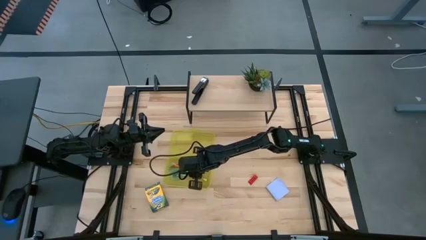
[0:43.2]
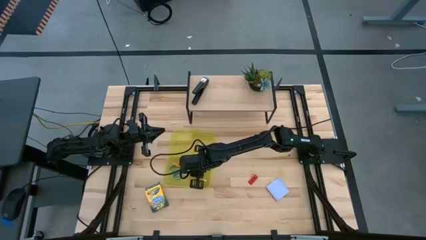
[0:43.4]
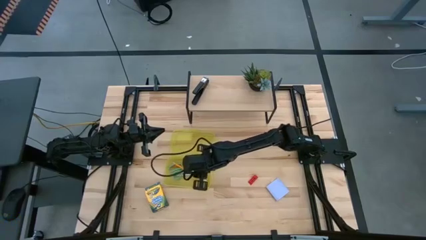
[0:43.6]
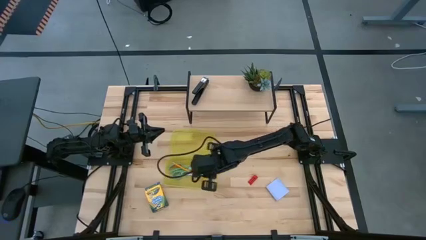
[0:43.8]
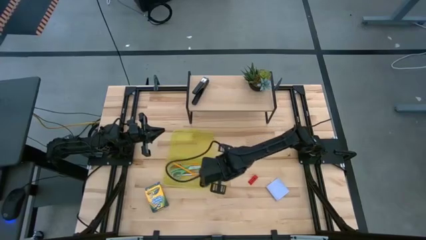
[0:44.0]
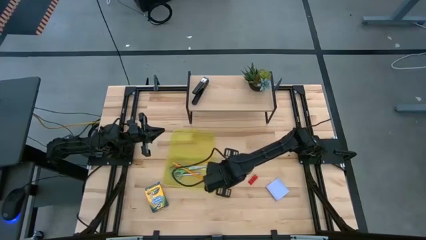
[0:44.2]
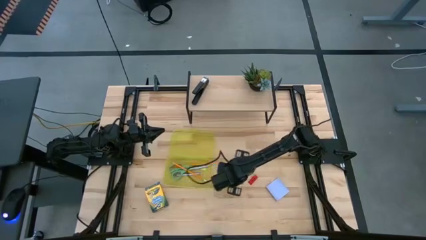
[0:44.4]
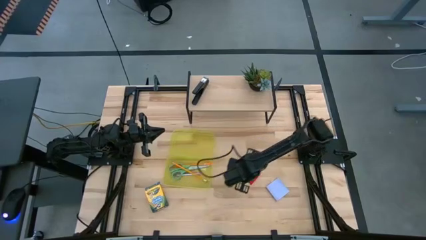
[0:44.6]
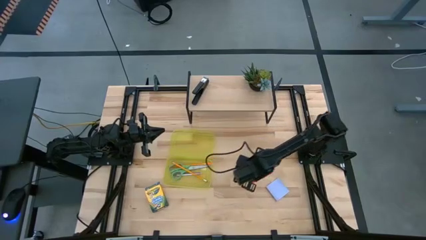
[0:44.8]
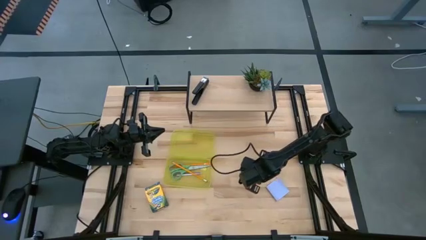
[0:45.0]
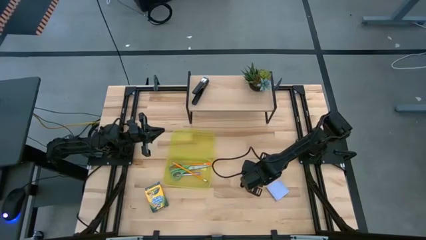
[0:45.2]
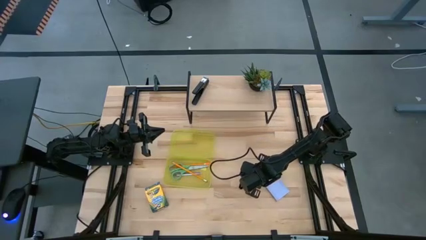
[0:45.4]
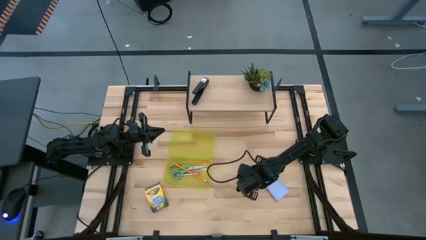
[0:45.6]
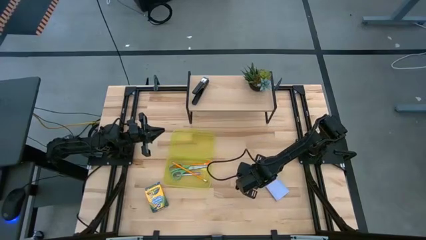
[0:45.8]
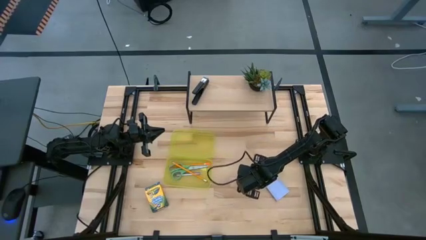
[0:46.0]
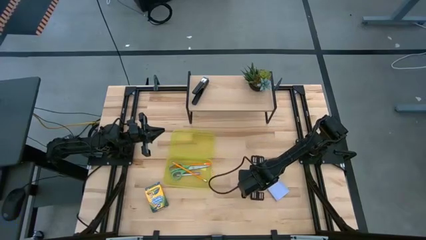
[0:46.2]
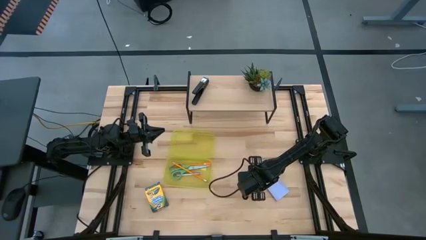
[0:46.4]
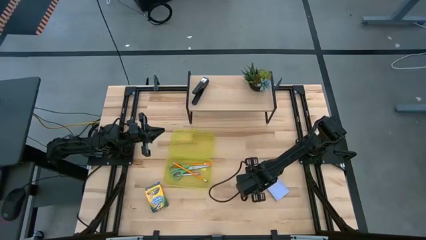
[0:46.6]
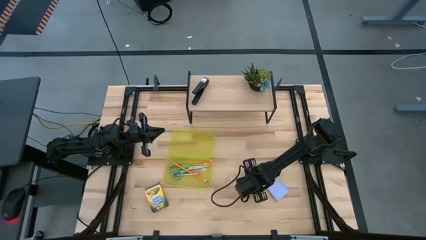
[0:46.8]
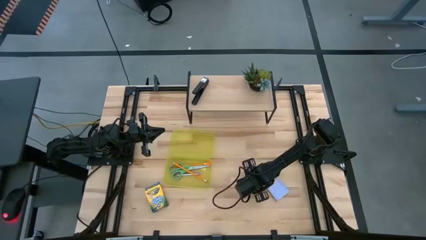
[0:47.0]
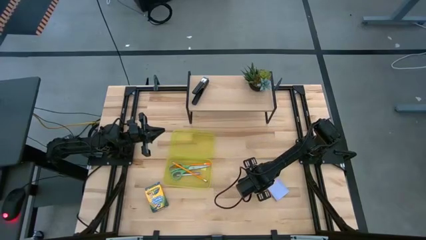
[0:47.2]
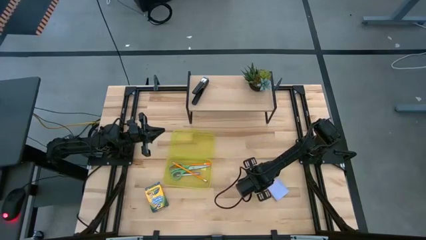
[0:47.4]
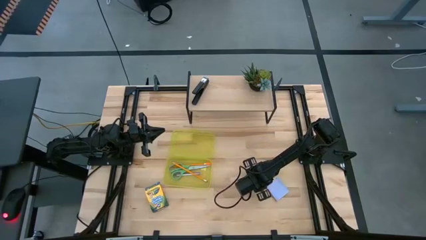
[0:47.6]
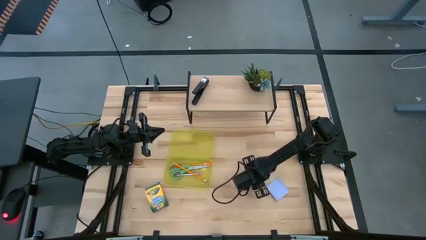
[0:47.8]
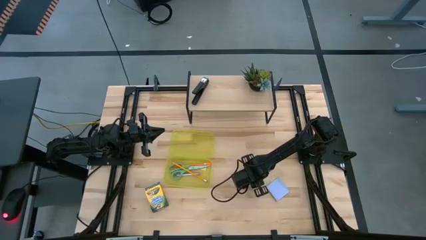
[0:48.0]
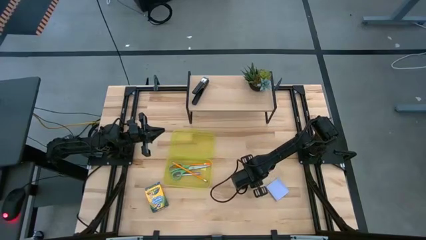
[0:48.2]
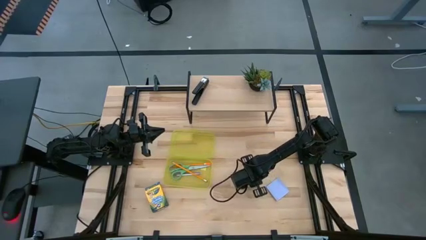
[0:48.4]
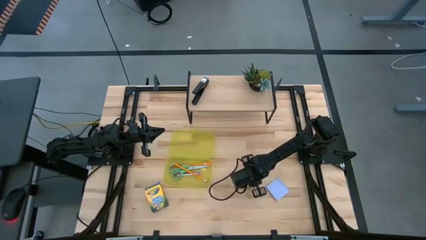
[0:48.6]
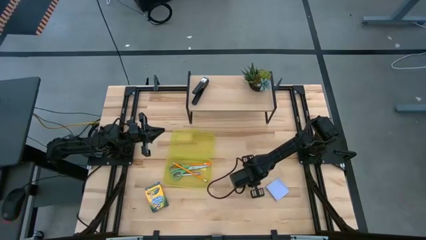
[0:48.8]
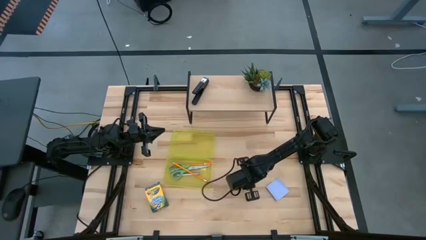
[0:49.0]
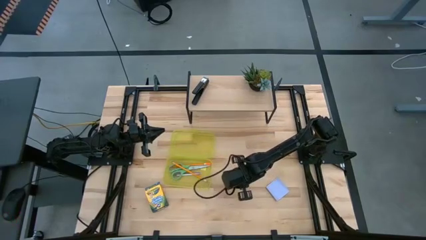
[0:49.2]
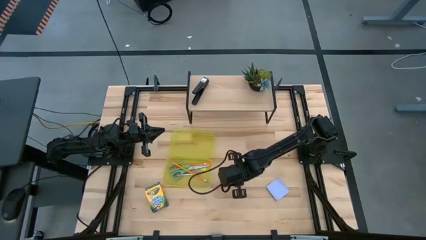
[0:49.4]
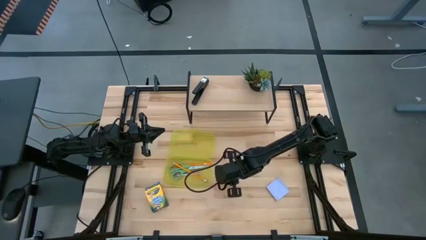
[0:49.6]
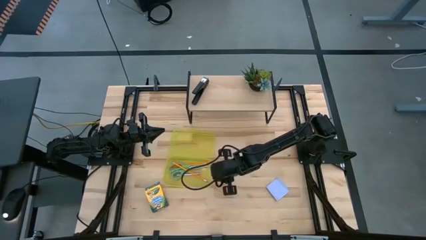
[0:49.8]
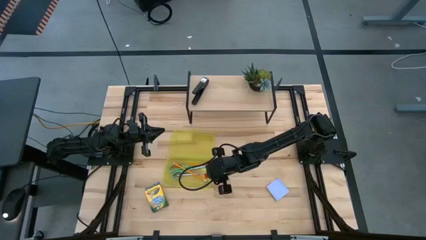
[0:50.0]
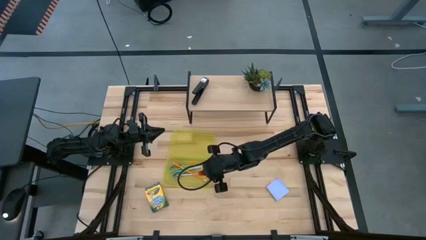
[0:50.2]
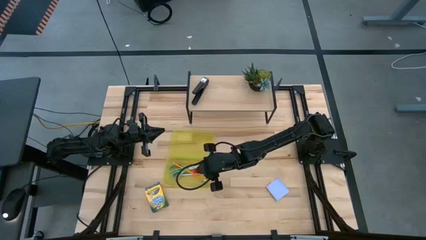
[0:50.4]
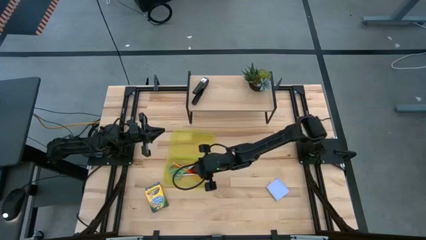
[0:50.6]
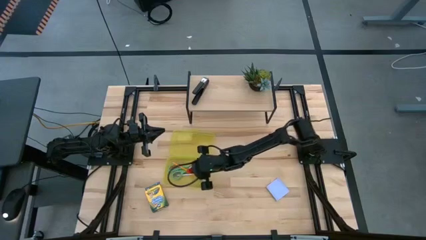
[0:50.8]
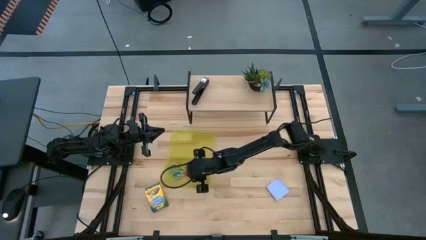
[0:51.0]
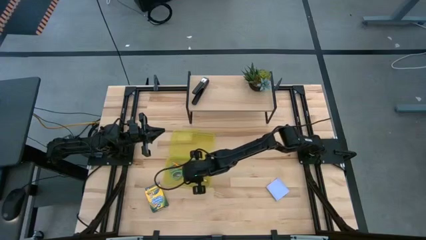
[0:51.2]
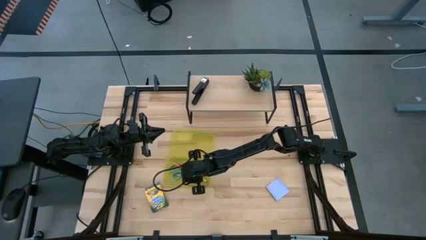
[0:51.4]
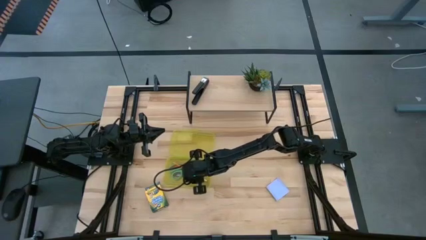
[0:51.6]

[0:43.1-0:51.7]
Task: Pack school essentials
Put the red eraser into the supply box

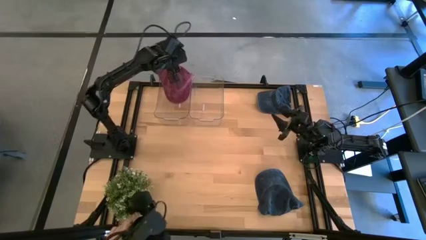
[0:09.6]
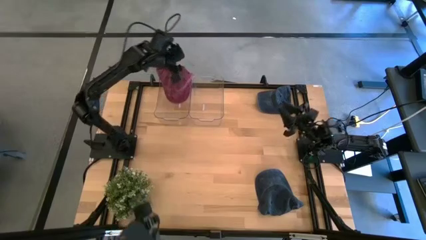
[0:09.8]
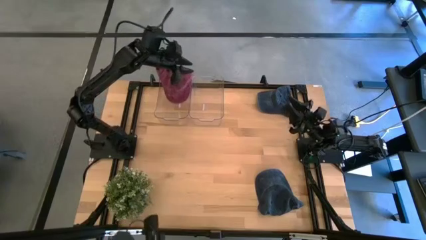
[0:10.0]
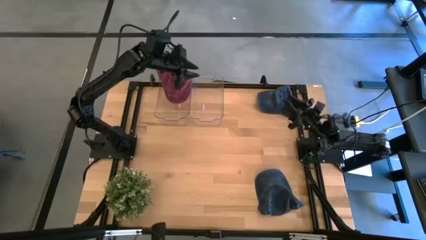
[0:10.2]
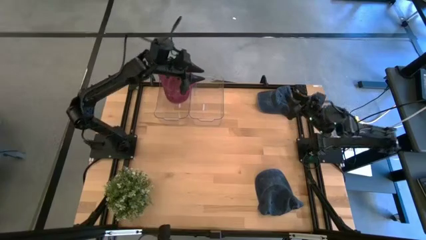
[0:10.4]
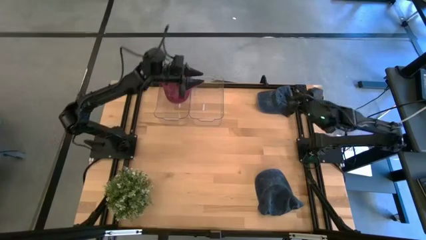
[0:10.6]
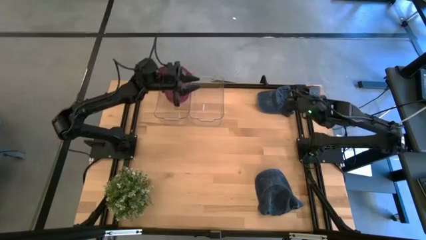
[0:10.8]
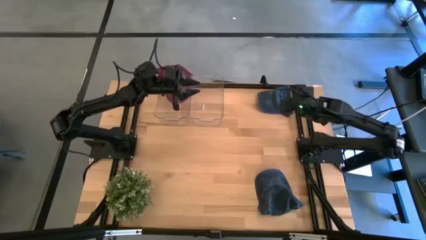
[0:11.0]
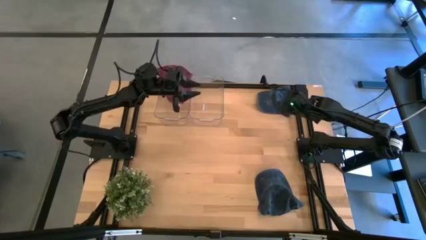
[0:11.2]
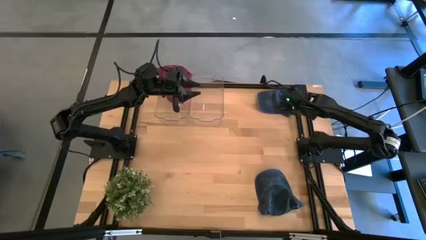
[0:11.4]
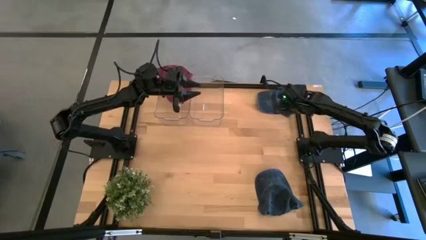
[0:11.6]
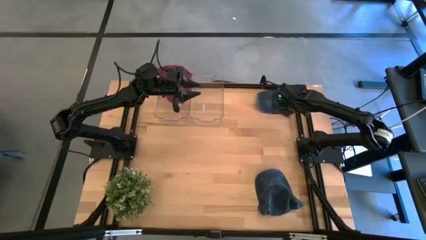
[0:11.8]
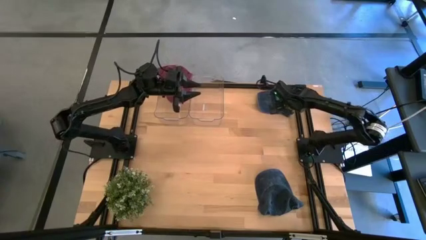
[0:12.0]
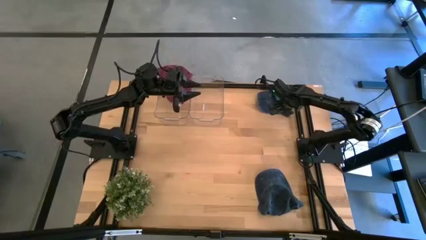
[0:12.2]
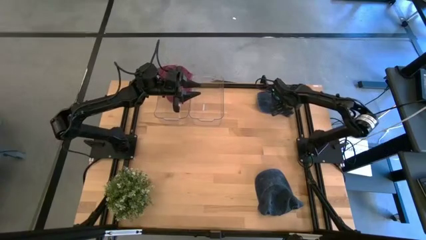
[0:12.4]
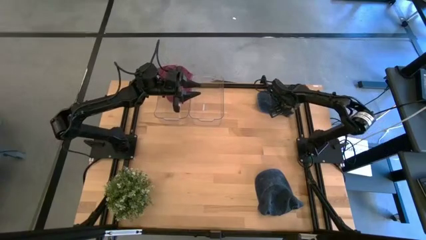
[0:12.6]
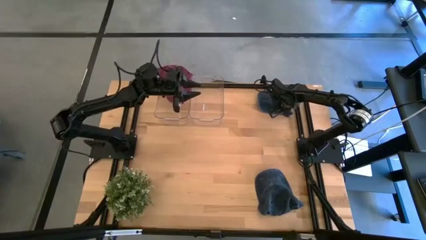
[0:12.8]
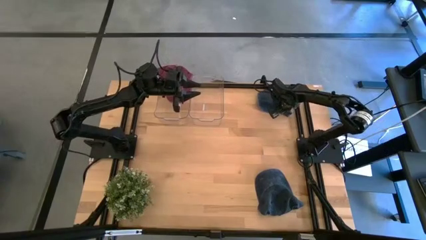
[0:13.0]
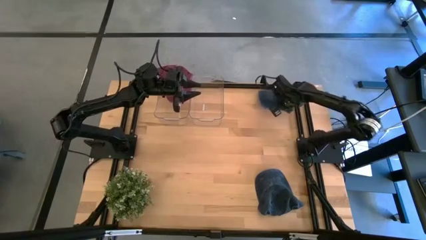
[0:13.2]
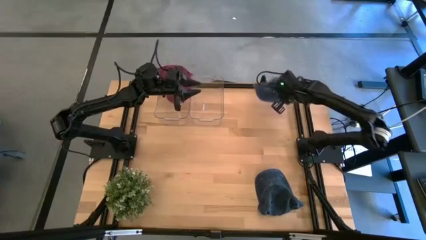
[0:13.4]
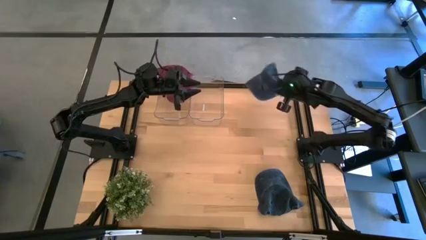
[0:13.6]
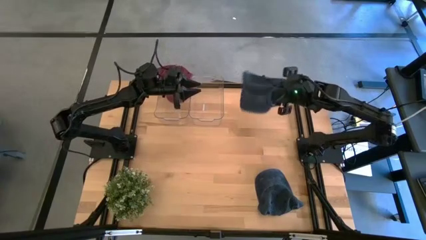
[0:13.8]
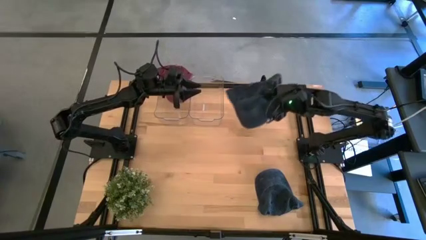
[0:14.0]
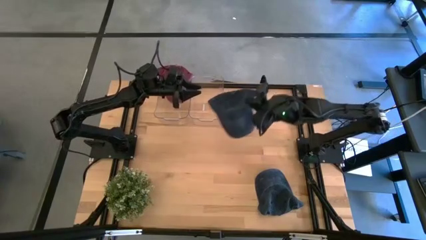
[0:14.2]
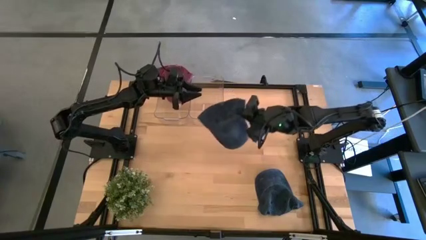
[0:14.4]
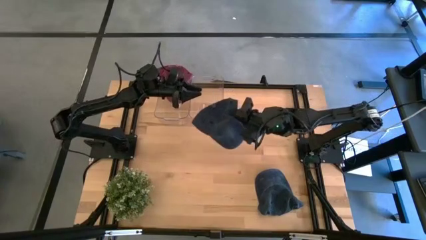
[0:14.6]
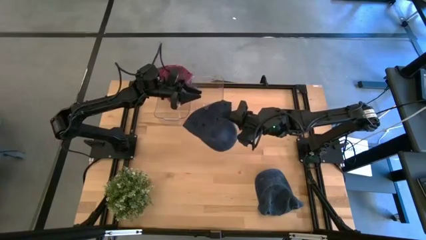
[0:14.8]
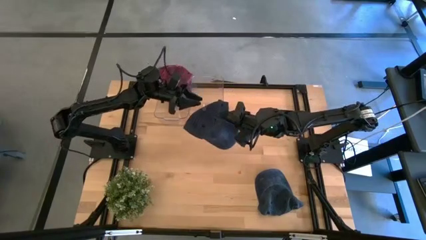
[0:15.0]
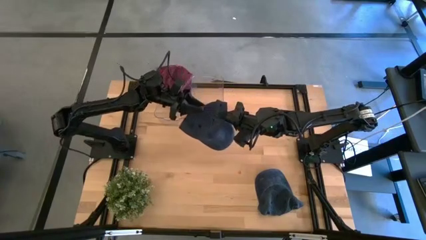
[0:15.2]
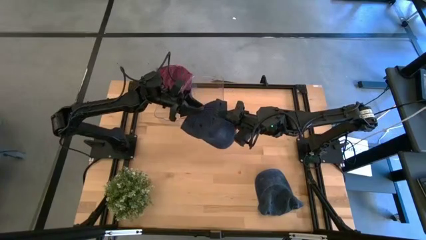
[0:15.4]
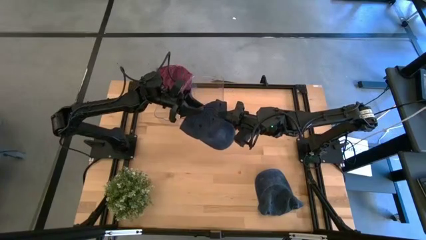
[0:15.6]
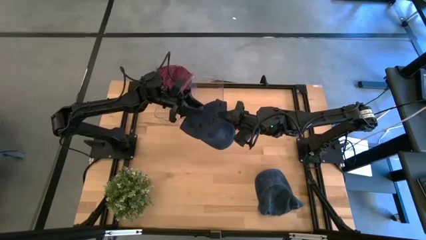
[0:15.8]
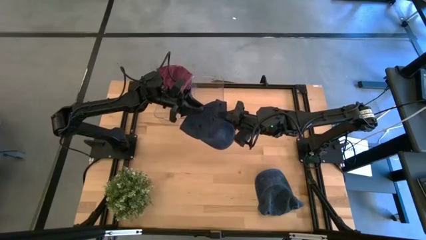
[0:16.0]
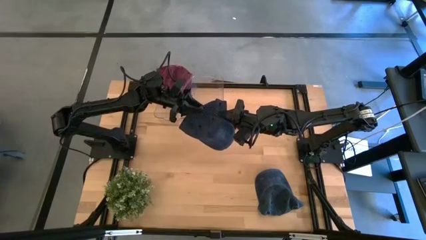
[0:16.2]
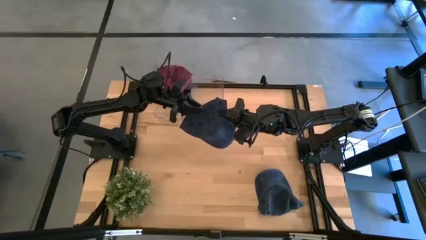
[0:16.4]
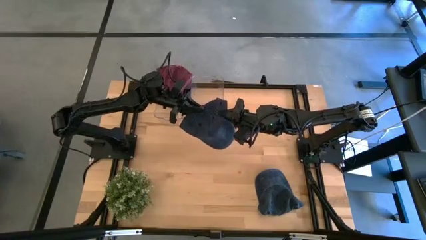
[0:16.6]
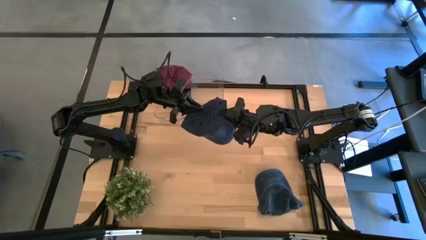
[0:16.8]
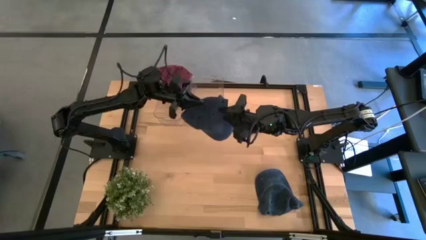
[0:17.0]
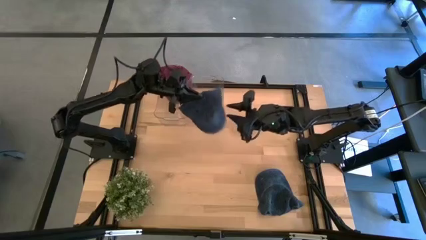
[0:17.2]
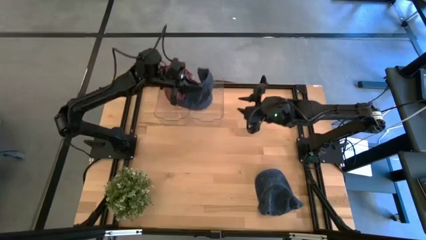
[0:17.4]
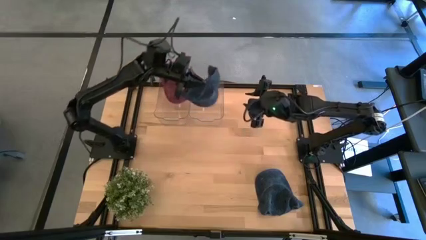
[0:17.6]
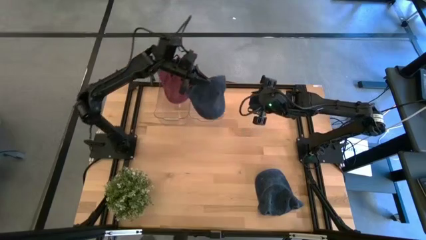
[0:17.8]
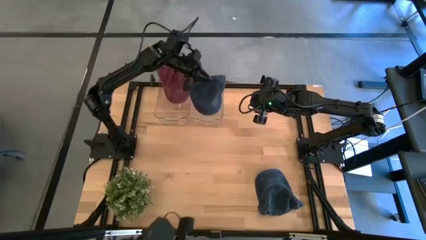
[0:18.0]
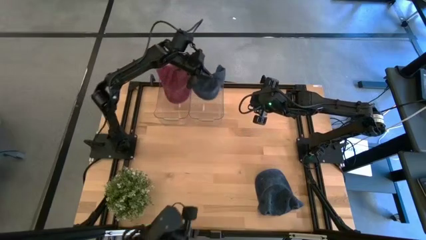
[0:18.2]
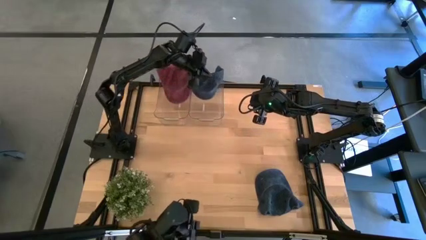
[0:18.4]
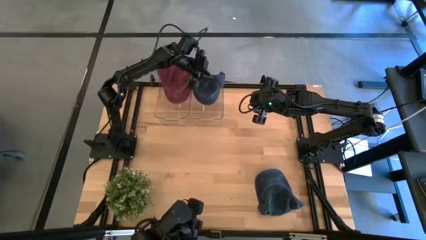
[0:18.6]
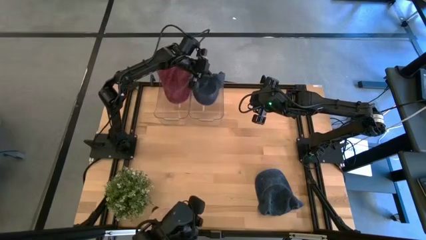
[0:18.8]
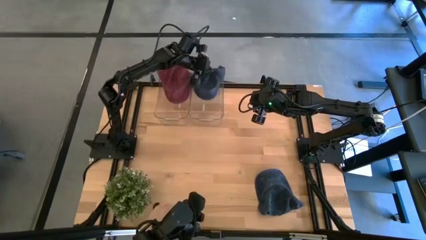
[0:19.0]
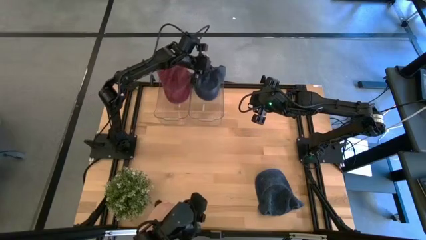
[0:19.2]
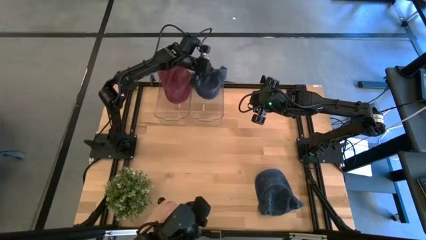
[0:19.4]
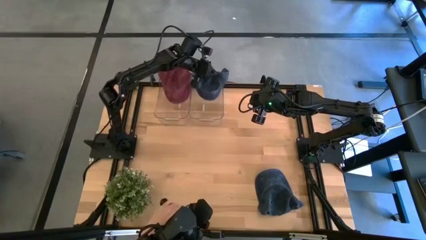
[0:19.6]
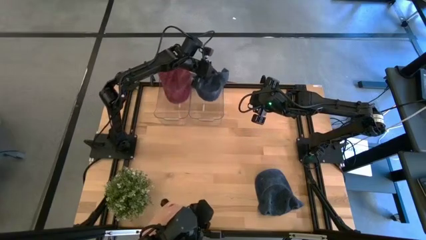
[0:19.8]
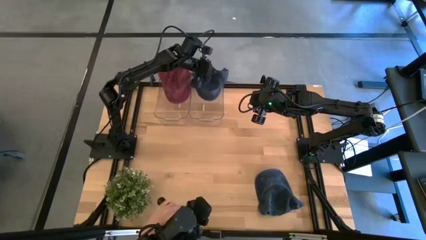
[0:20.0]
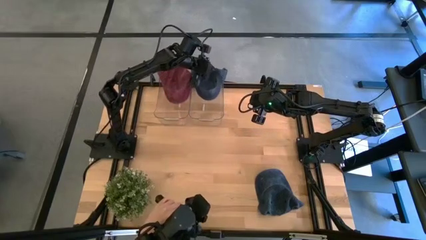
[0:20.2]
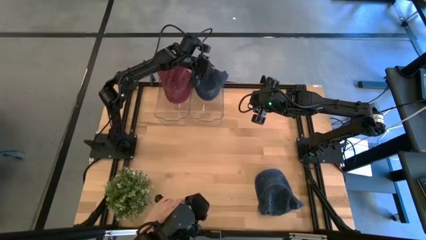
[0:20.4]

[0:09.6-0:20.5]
Task: Pick & Place hat
Put the top blue cap into the right transparent bin
